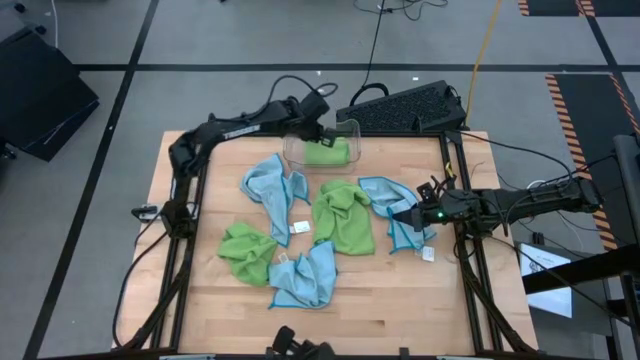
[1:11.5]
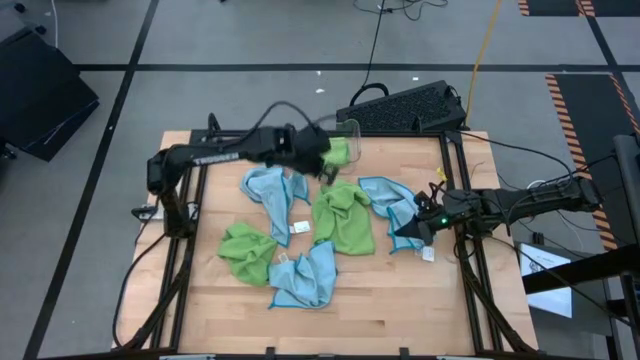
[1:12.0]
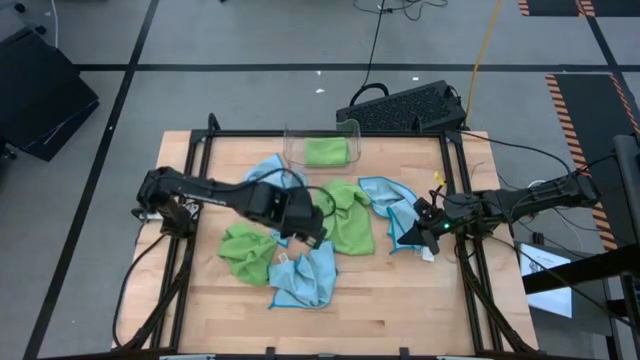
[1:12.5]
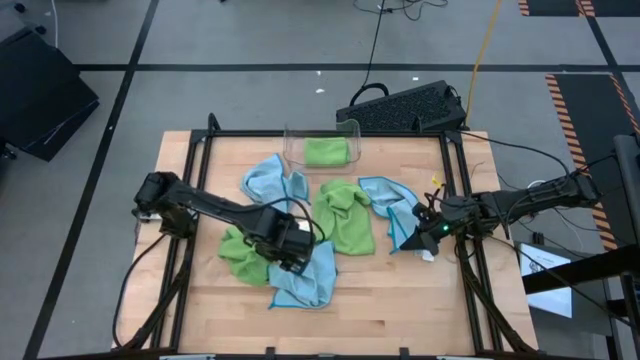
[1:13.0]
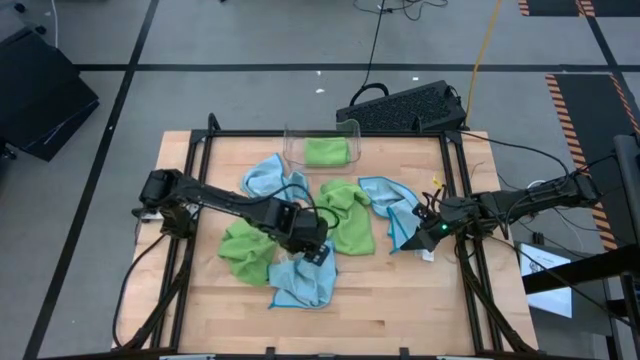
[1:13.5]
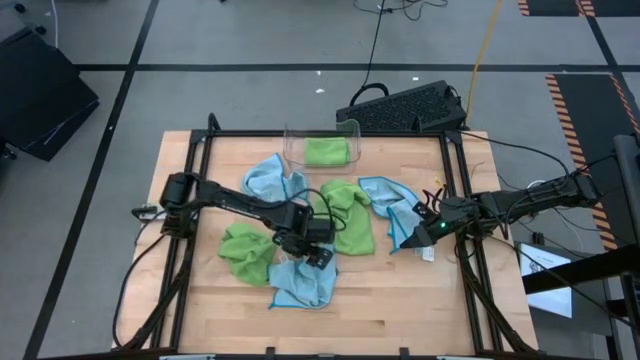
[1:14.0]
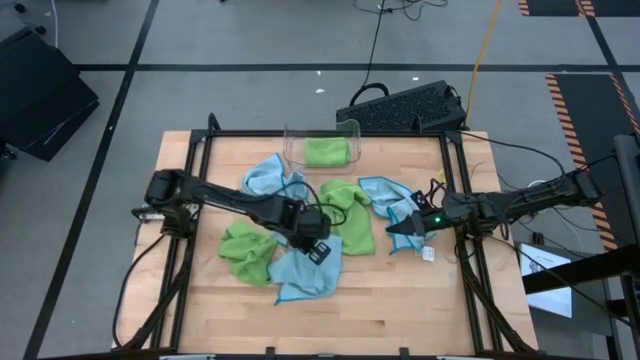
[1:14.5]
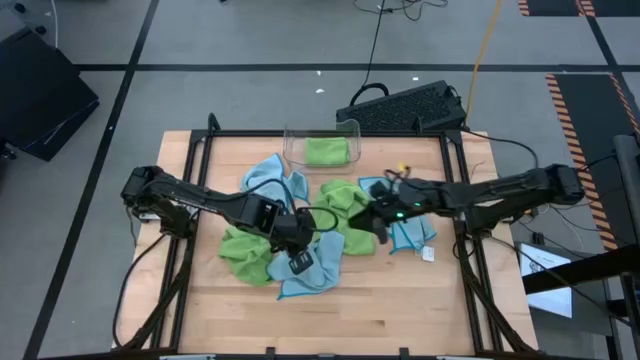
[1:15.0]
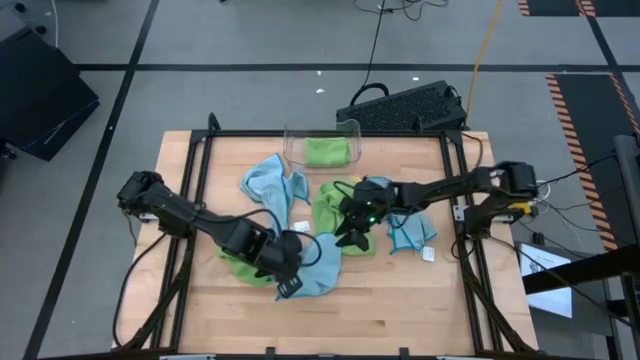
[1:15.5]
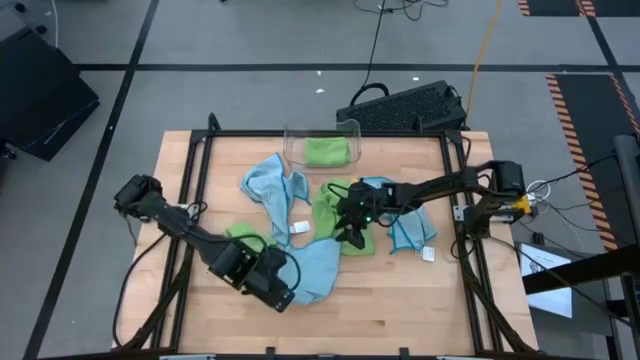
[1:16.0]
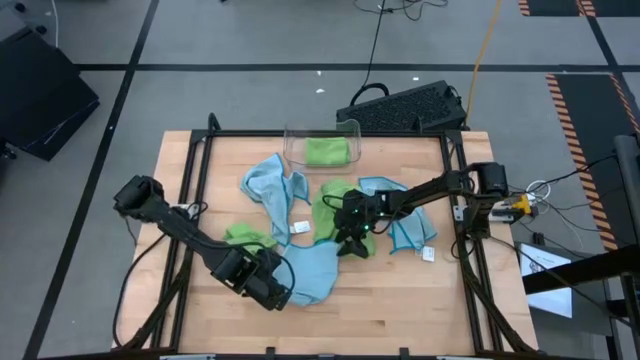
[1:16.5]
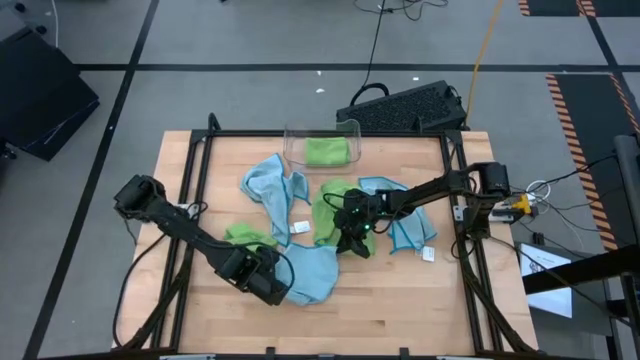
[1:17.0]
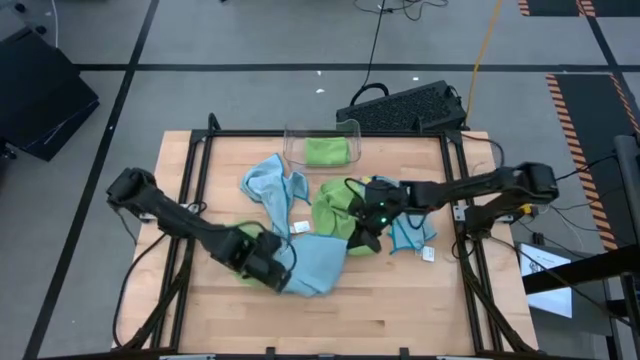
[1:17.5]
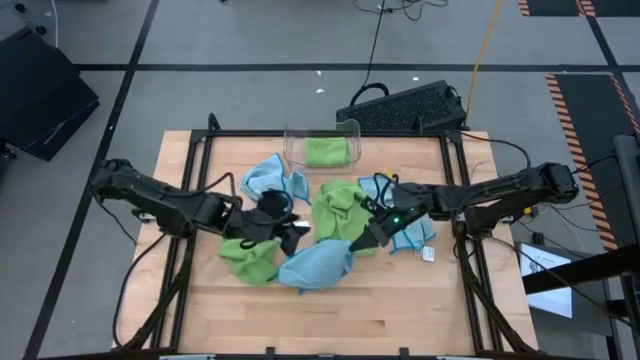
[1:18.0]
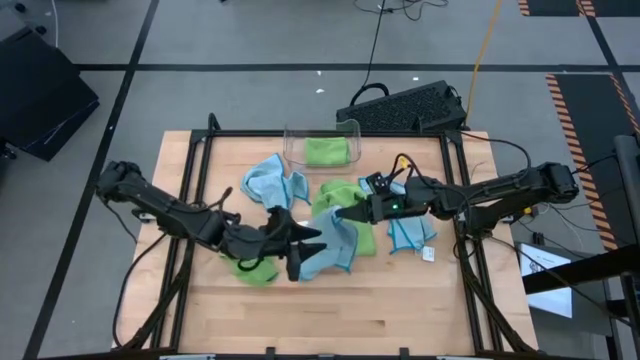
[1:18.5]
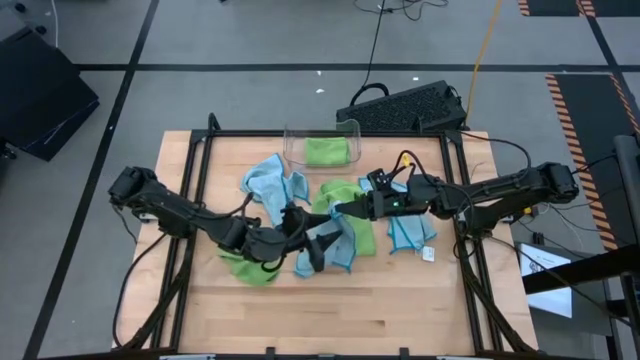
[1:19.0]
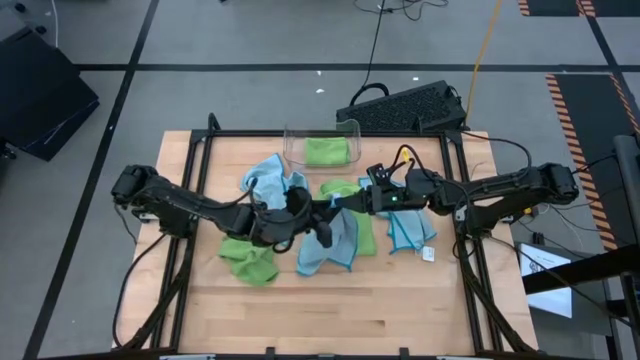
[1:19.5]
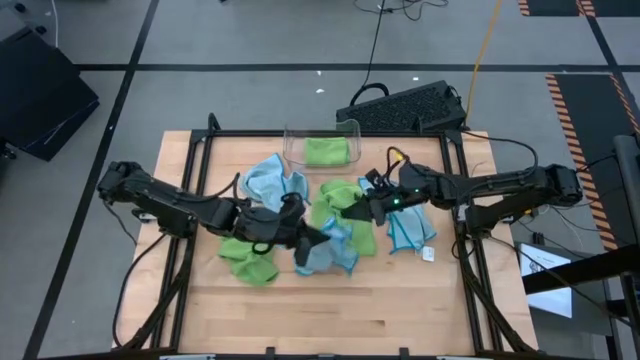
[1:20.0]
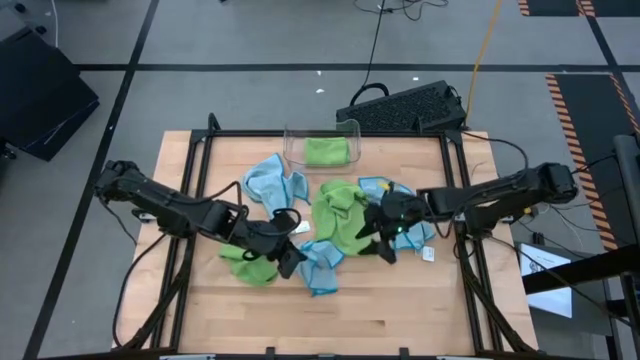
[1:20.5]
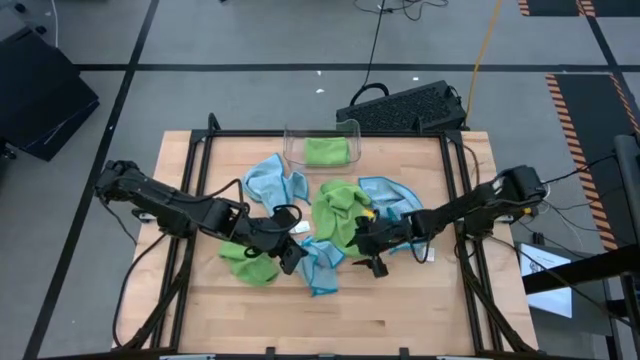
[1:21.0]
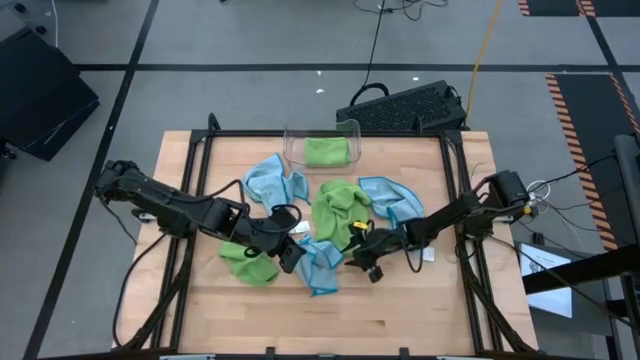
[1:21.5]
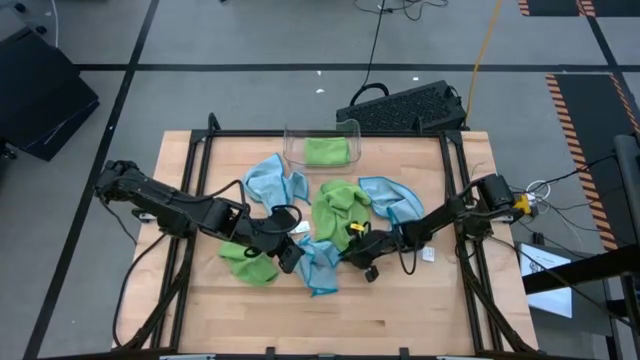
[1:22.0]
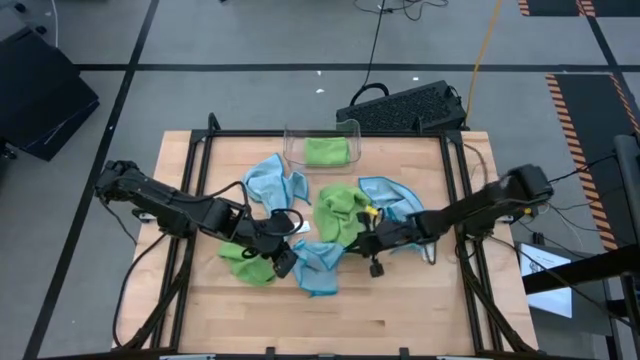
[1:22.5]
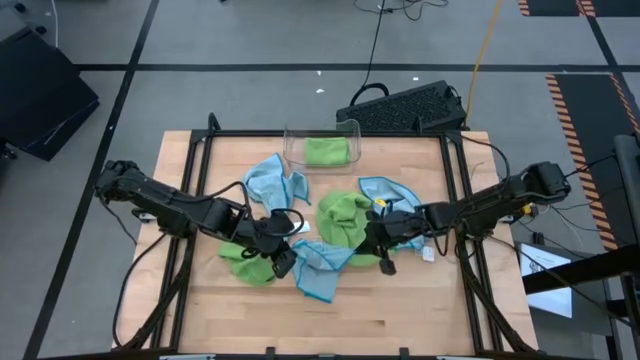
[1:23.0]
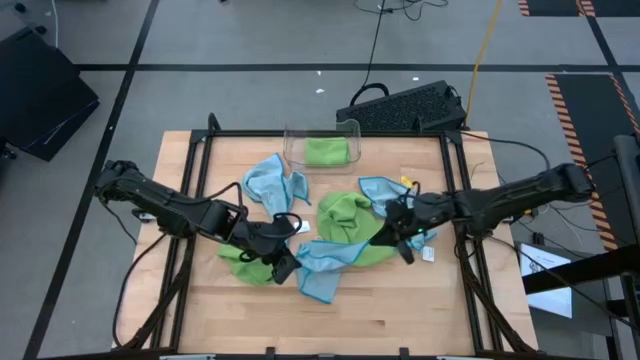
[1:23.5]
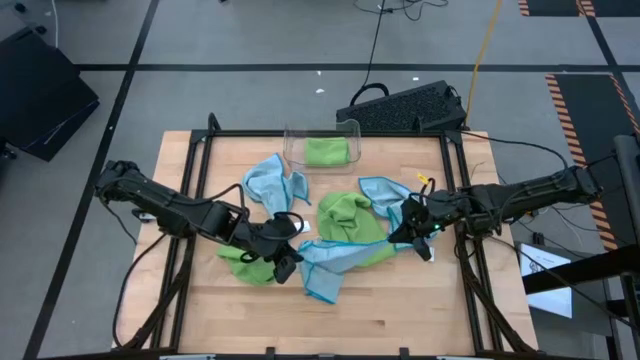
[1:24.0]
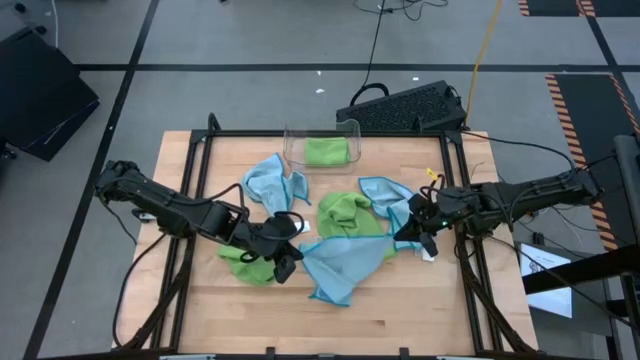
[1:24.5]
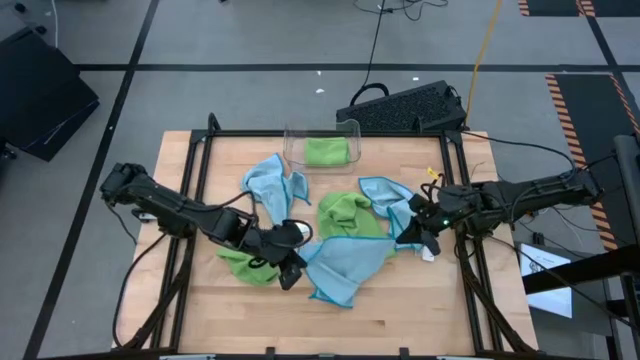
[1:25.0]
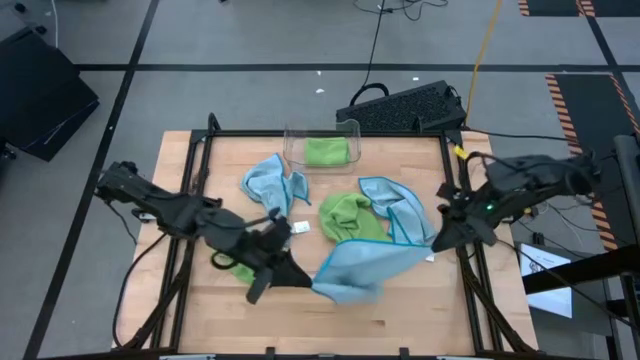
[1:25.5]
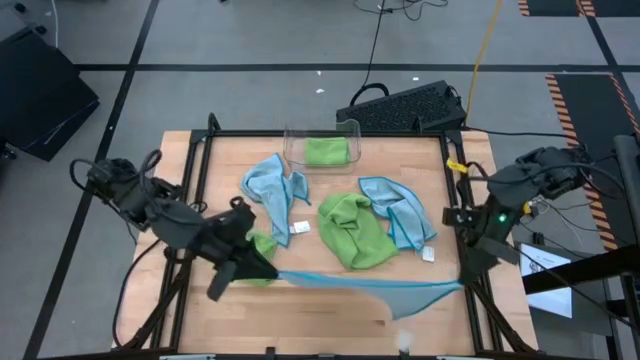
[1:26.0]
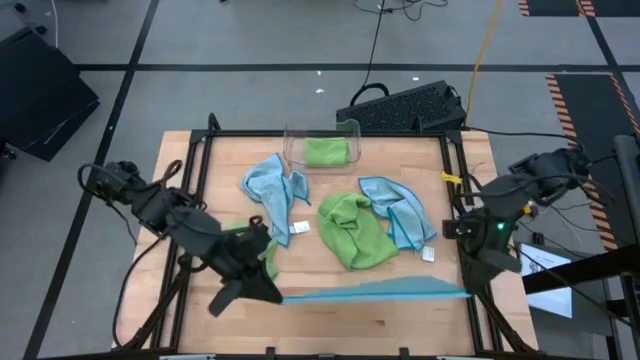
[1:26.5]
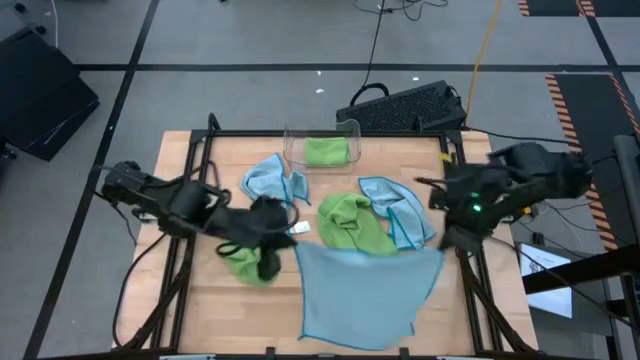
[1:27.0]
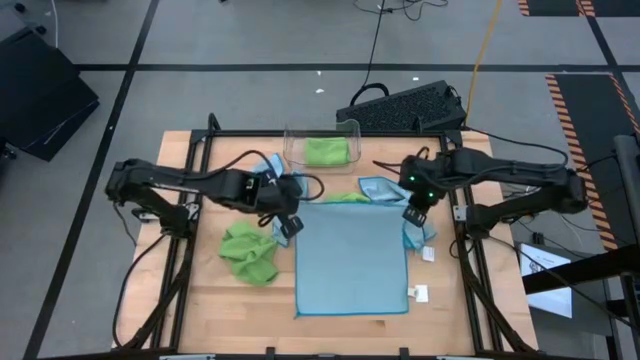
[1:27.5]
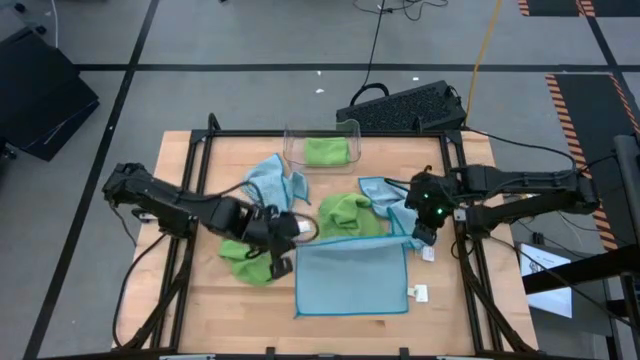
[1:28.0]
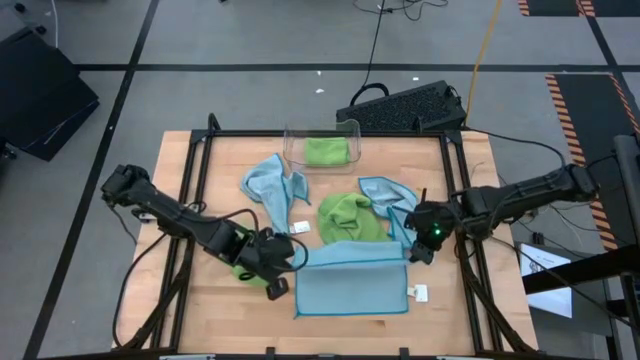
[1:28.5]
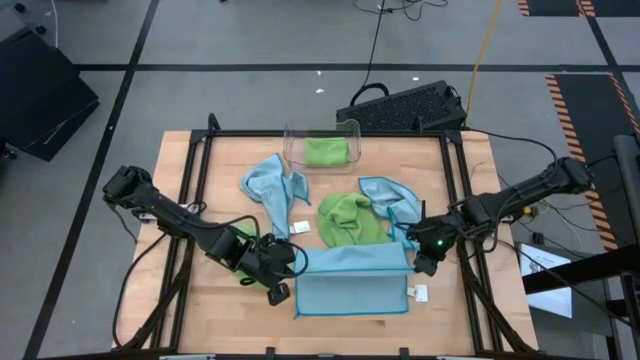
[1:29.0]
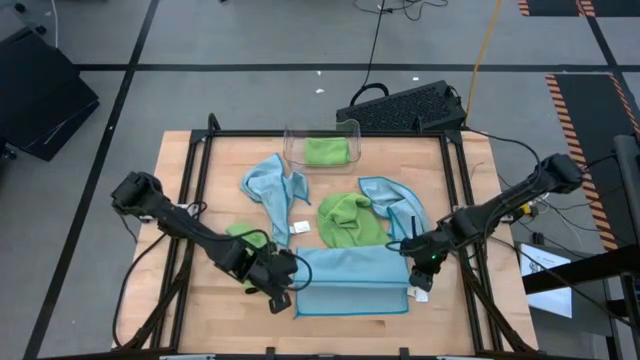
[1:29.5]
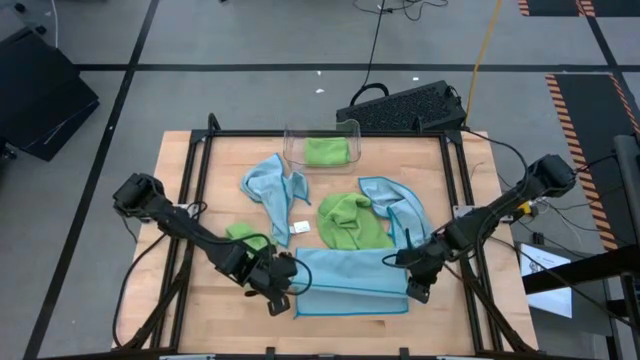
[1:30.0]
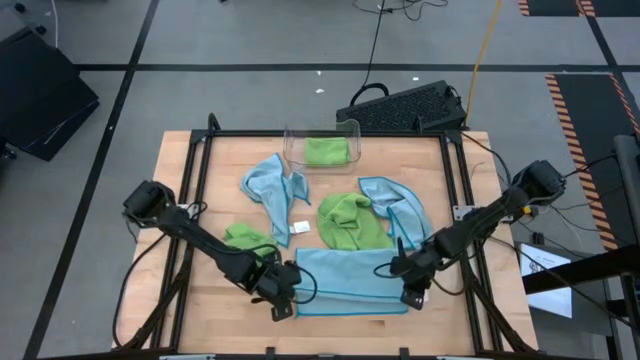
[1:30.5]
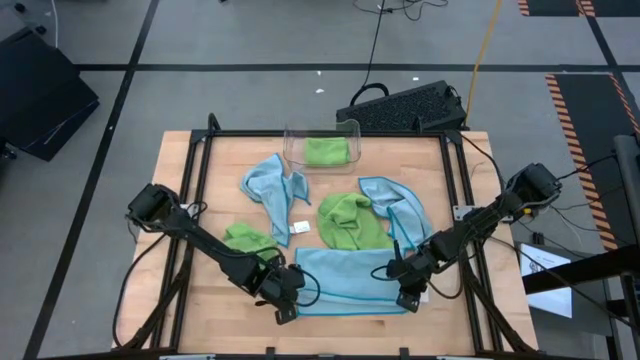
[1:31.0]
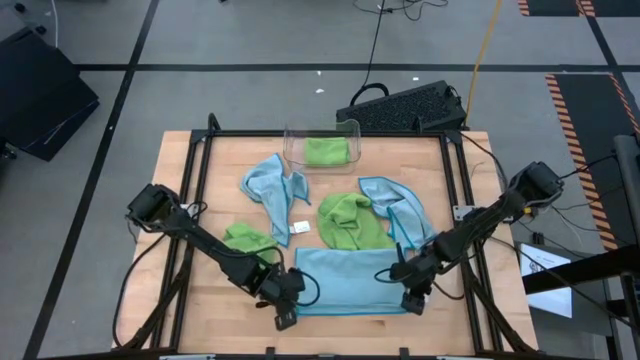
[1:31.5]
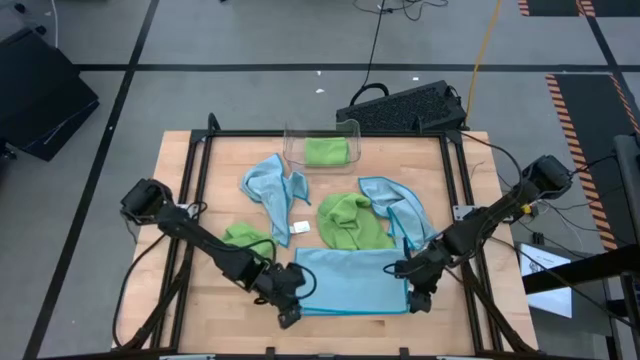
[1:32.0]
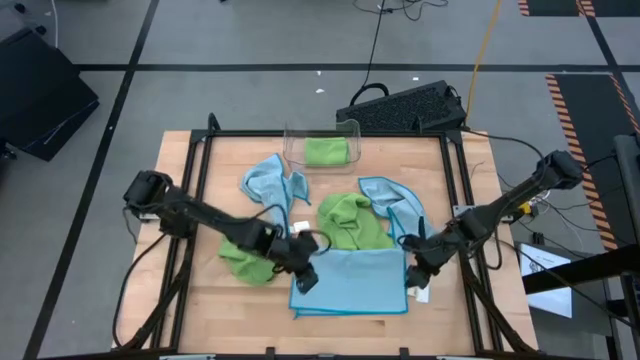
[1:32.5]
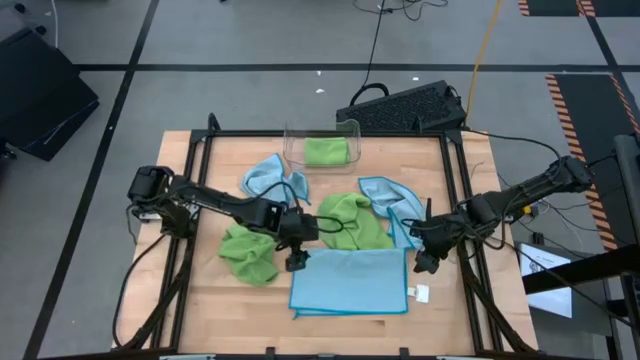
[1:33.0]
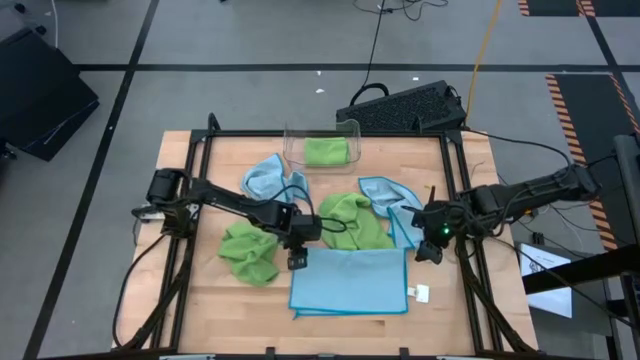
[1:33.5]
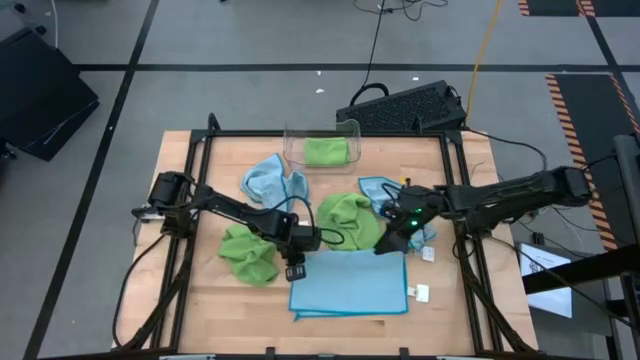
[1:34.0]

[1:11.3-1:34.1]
Task: Fold microfiber towels
Fold the bottom blue microfiber cloth

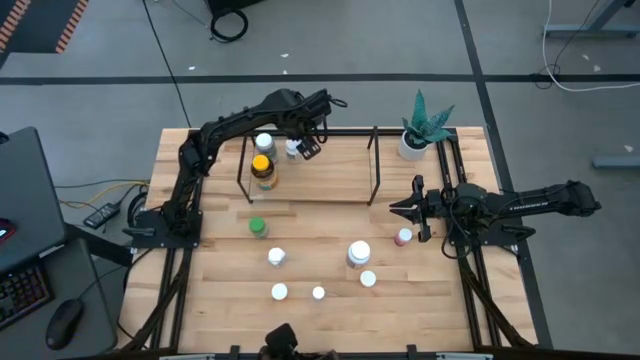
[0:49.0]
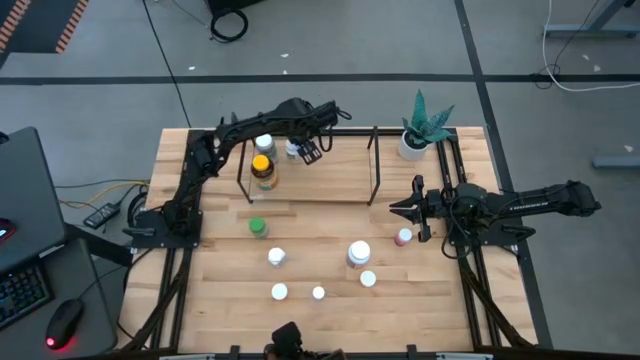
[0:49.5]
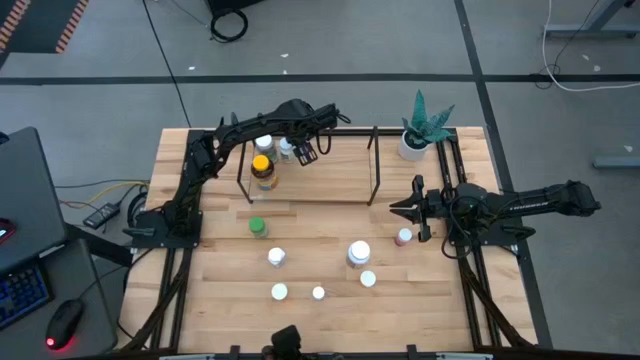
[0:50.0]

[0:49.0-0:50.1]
Task: Pick and place medicine bottles onto shelf by color
Adjust the white pill bottle on the shelf
